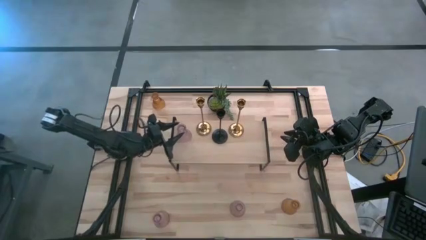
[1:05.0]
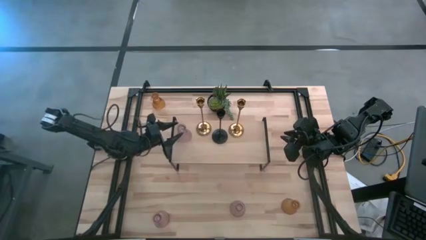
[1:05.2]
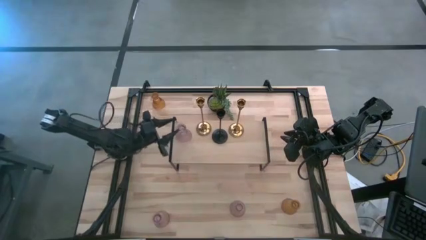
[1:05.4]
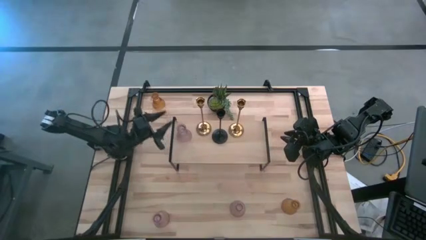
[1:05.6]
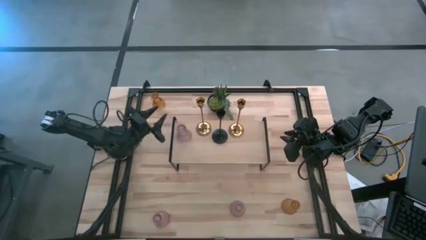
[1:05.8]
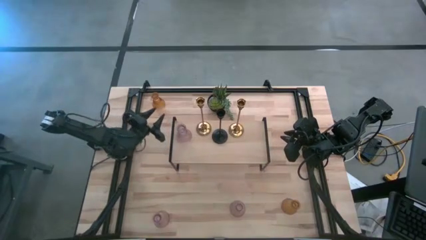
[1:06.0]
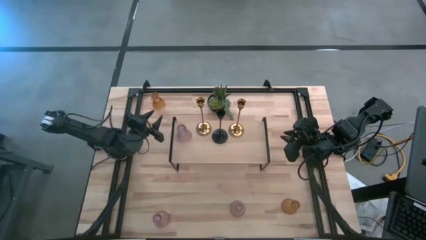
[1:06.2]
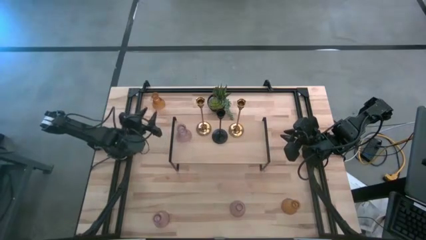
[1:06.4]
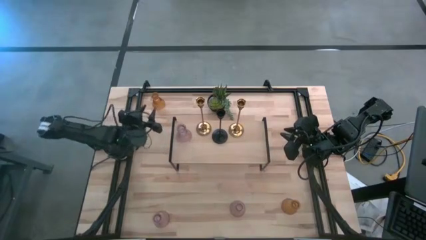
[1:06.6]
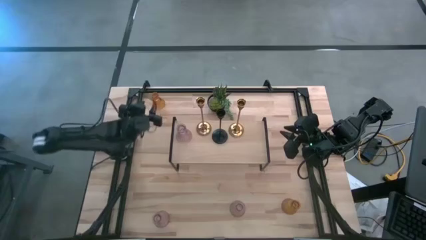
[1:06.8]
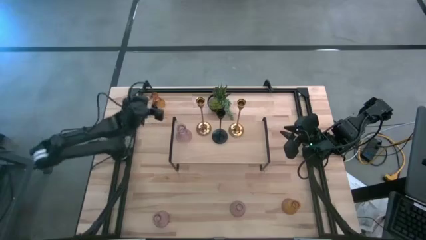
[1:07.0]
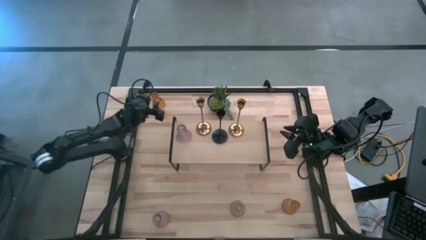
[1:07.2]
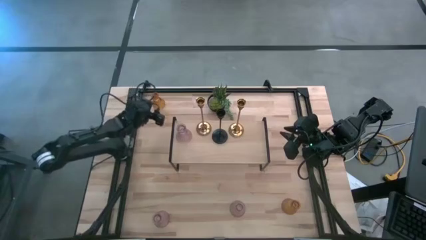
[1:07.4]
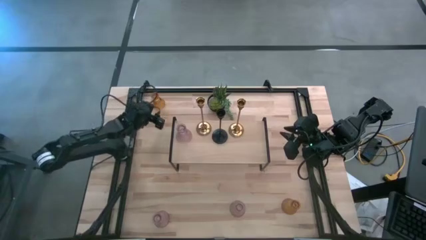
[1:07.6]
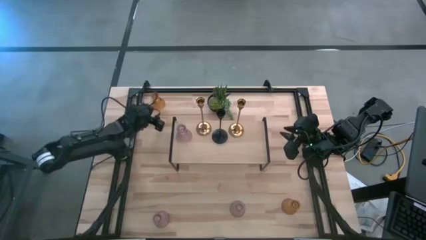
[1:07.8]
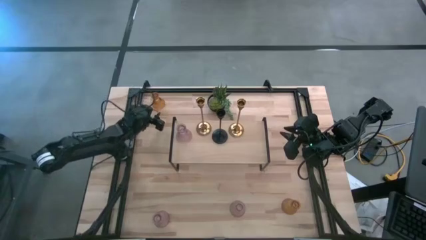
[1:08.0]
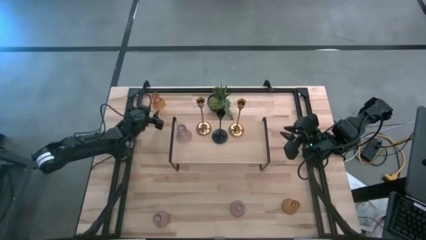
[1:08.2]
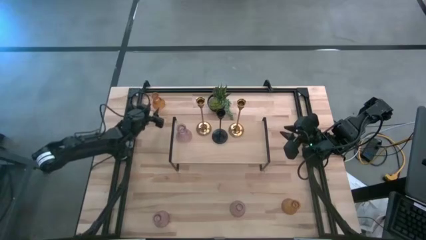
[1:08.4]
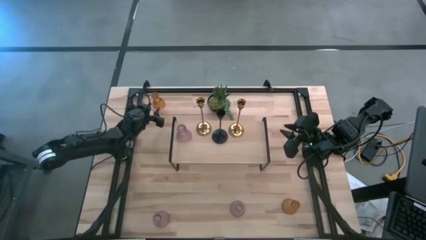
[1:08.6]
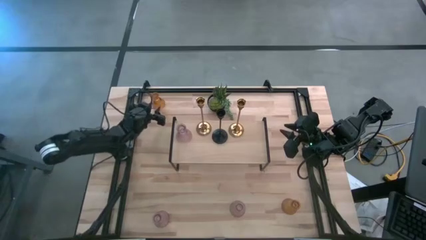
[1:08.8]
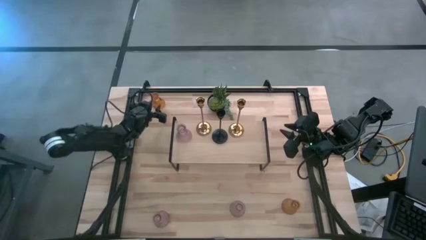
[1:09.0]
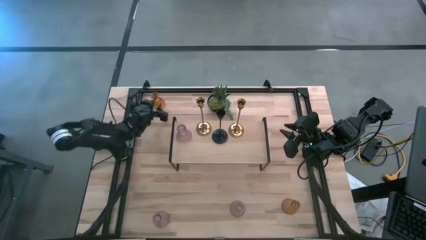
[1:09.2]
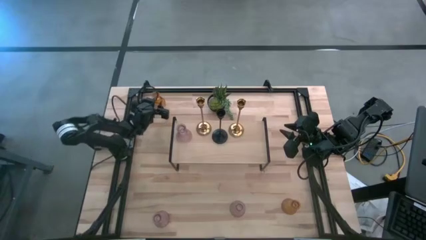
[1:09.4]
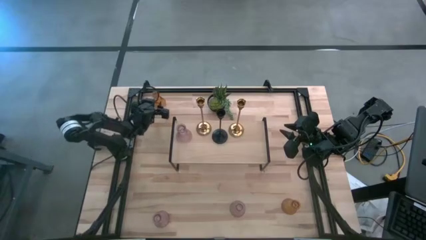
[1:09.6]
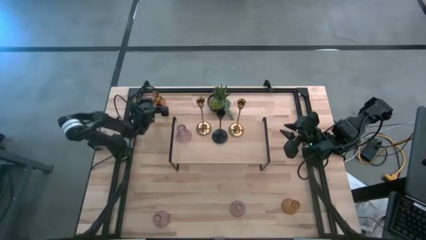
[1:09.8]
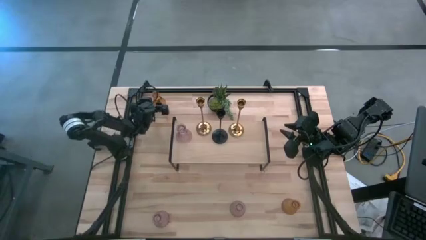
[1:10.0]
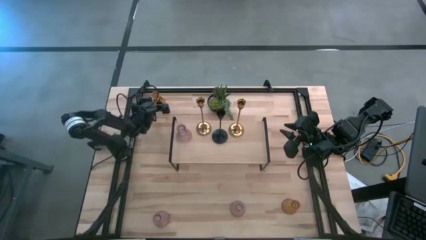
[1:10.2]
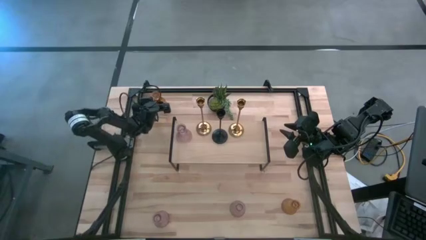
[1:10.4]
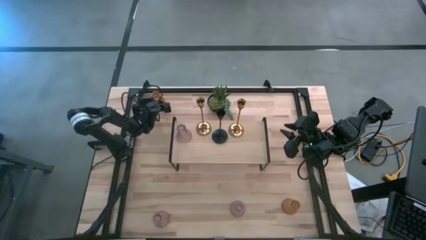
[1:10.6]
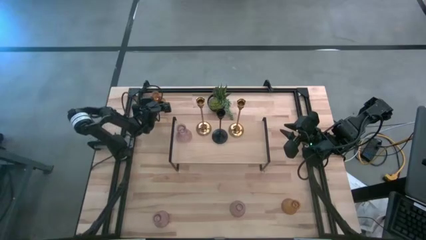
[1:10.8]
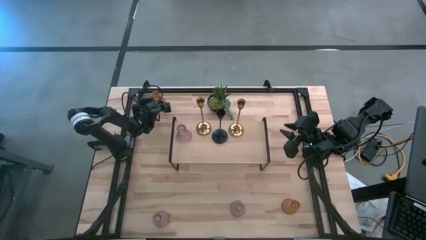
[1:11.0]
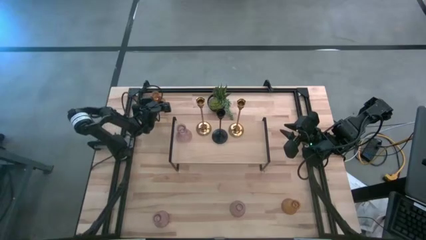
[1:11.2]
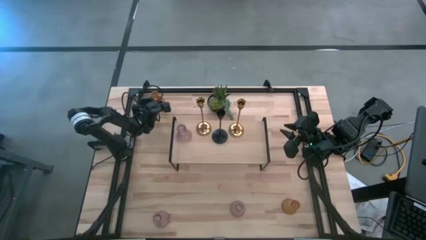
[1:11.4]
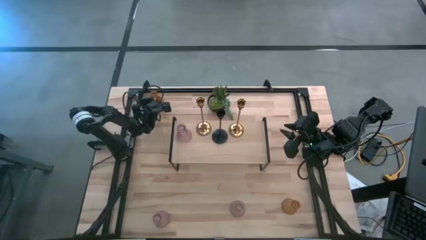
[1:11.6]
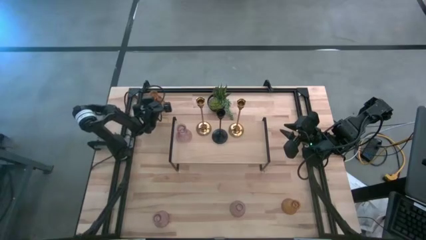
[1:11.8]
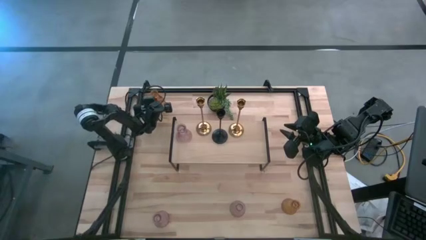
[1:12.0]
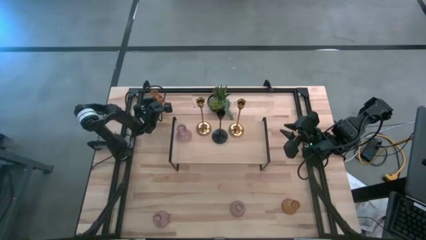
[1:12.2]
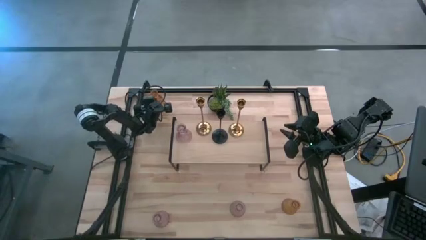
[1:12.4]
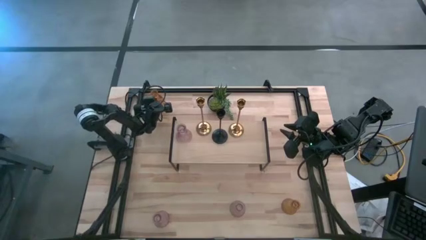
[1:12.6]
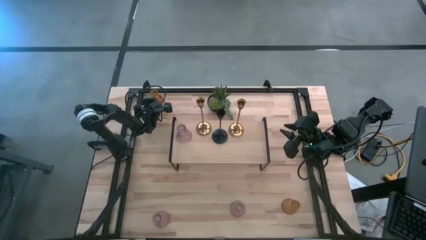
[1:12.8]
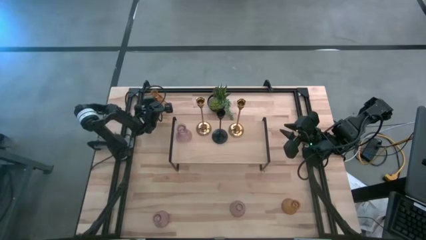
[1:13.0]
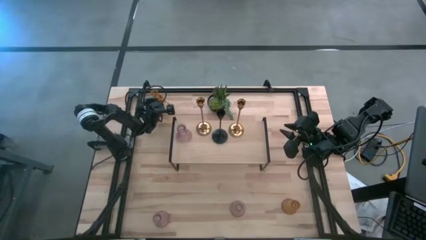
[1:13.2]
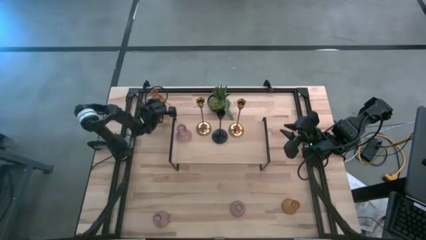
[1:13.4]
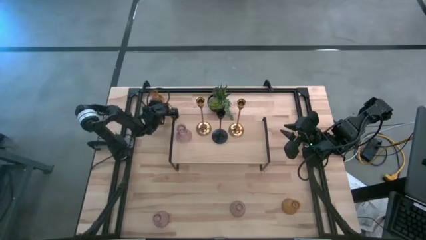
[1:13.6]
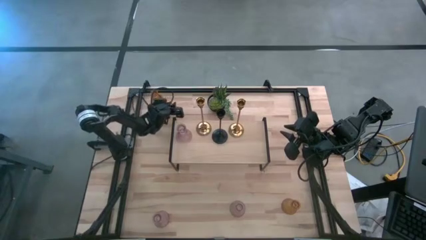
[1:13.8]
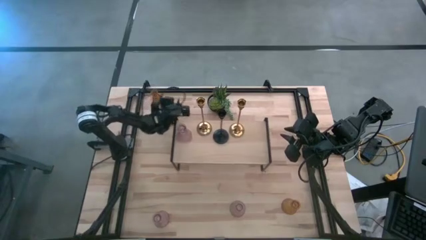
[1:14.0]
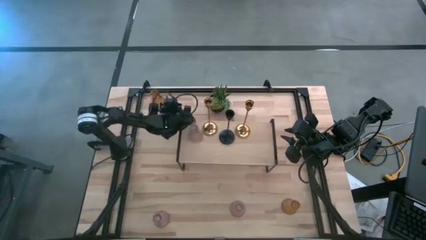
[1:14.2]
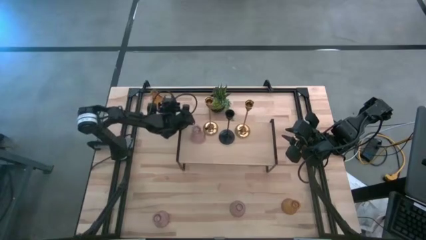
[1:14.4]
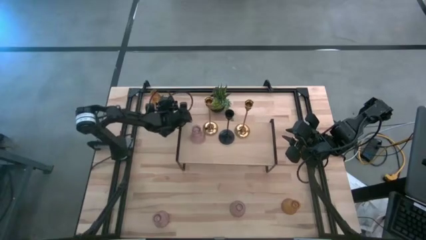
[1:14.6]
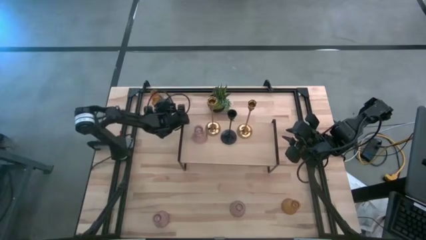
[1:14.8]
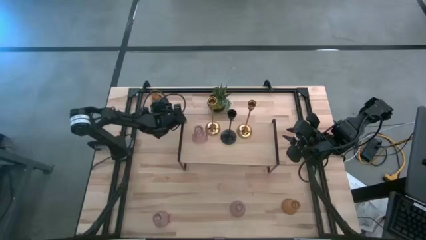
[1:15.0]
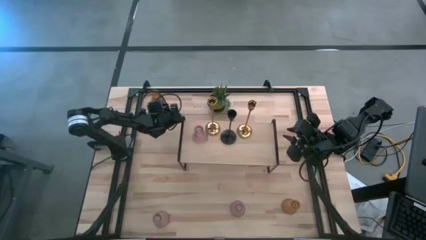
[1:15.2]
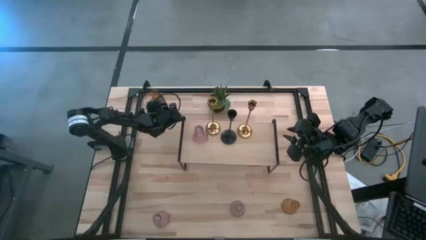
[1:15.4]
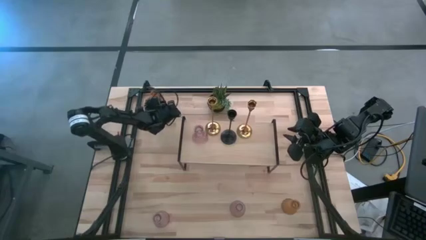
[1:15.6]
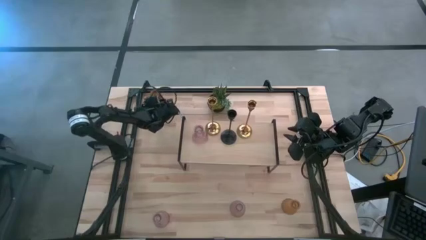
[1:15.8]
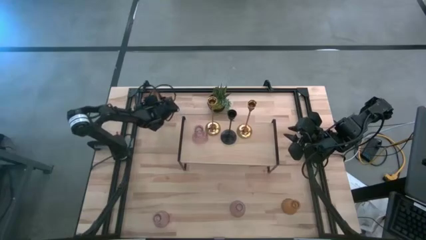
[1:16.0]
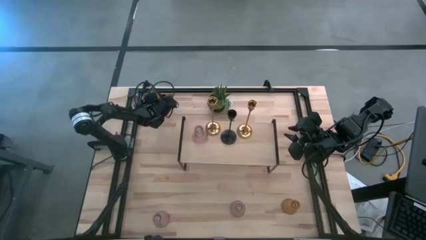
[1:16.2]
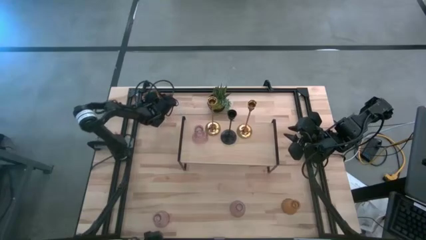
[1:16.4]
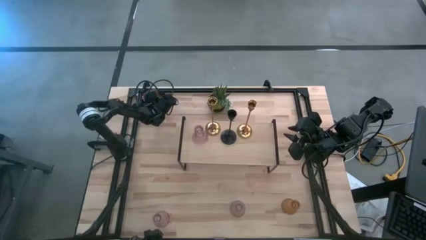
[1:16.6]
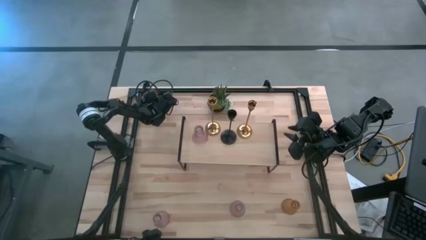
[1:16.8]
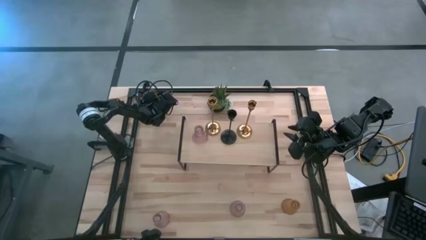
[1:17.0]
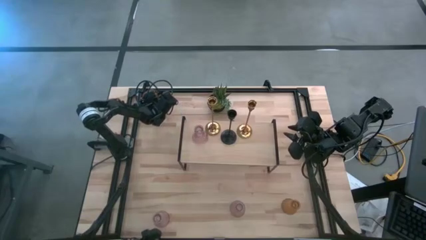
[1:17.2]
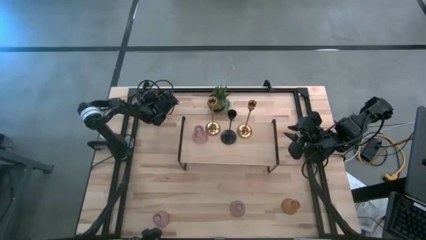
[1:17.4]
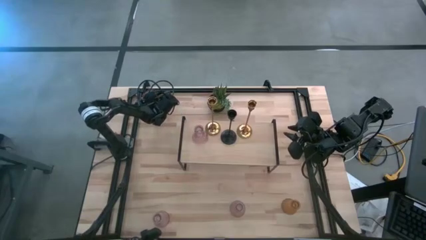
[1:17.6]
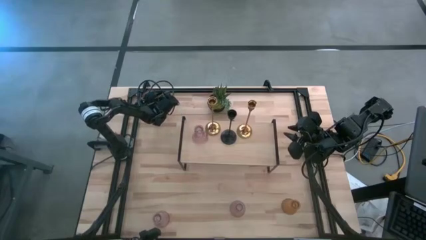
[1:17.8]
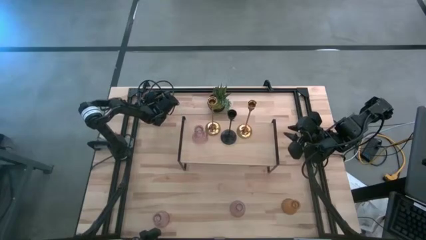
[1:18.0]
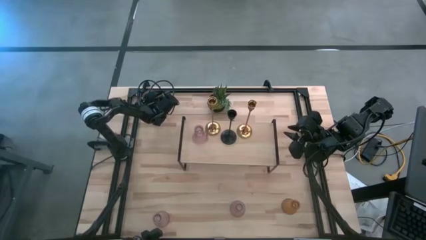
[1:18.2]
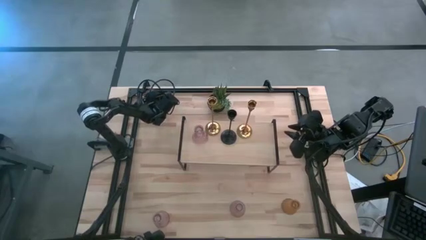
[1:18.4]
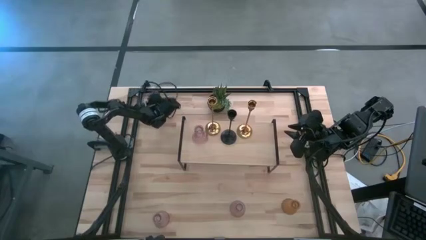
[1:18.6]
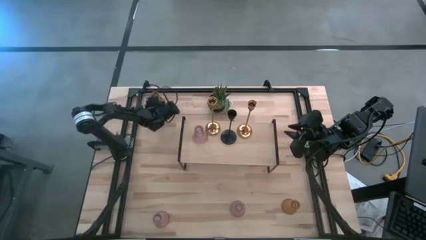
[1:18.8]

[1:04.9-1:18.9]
Task: Pick & Place candle stick holders
Put the top orange glass candle holder on the shelf

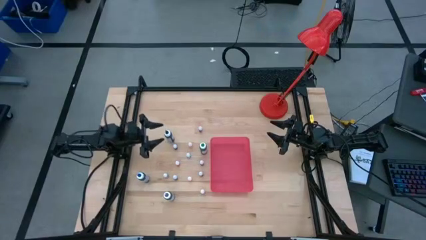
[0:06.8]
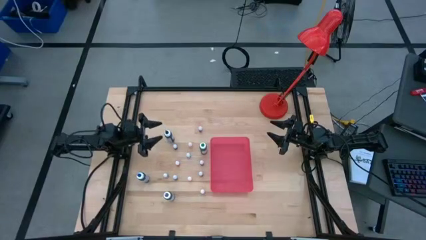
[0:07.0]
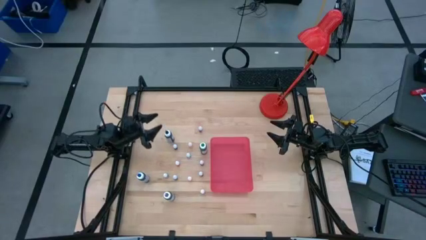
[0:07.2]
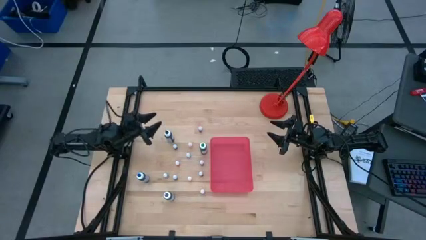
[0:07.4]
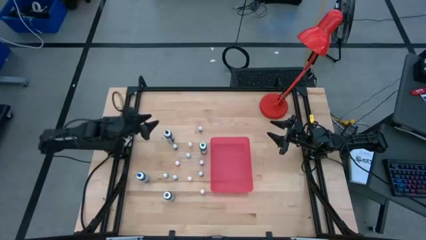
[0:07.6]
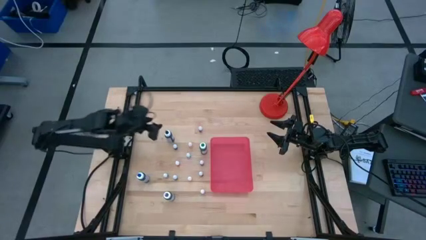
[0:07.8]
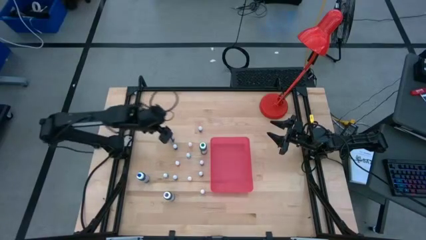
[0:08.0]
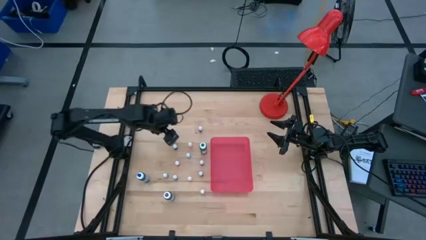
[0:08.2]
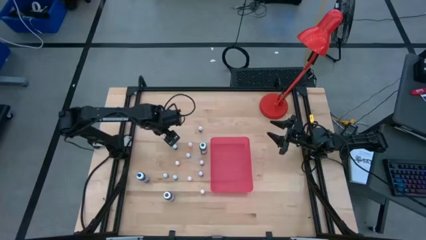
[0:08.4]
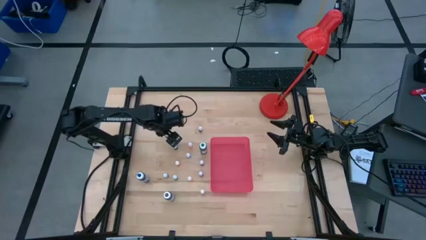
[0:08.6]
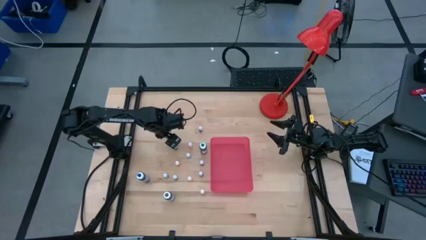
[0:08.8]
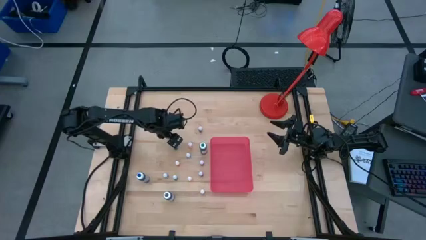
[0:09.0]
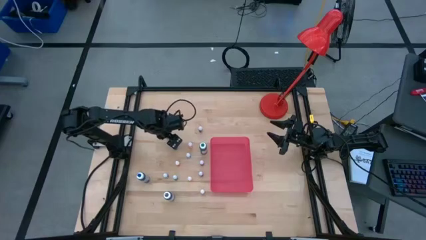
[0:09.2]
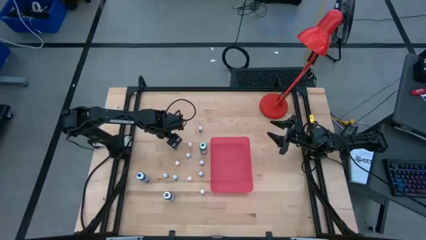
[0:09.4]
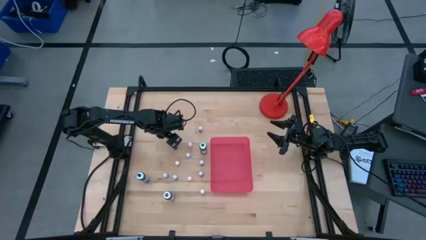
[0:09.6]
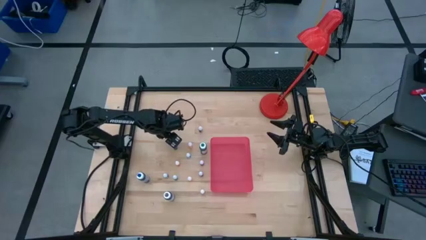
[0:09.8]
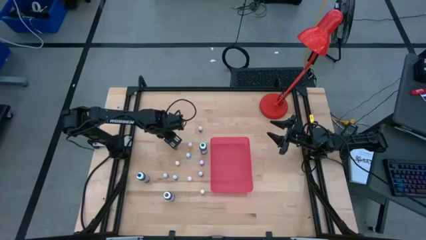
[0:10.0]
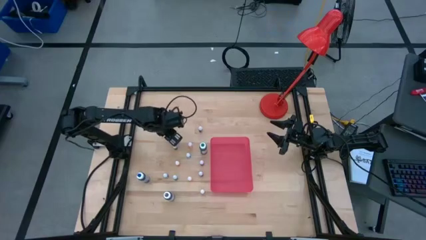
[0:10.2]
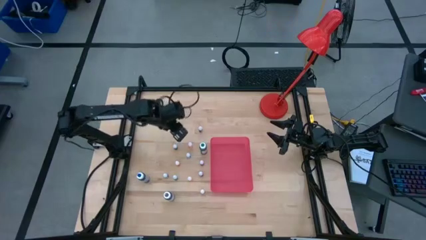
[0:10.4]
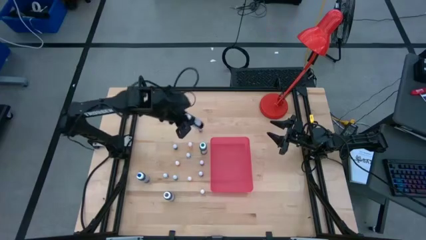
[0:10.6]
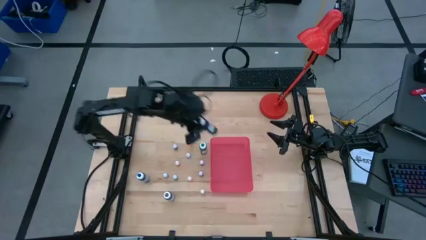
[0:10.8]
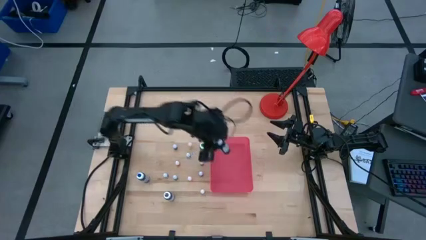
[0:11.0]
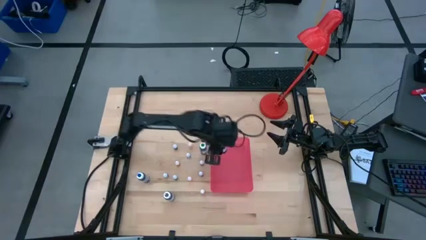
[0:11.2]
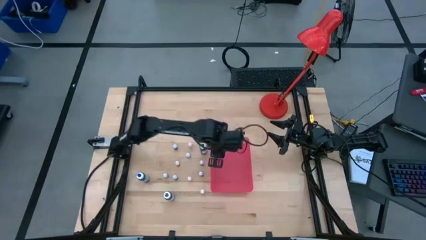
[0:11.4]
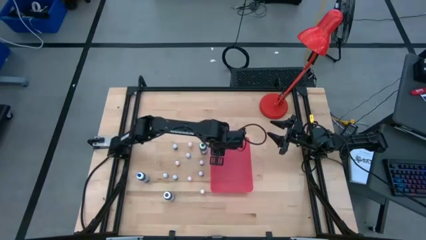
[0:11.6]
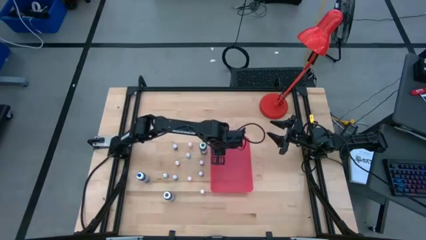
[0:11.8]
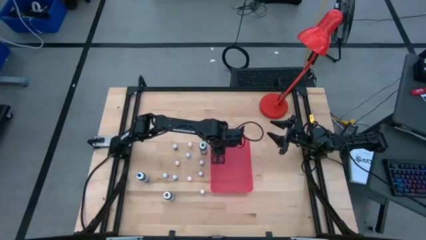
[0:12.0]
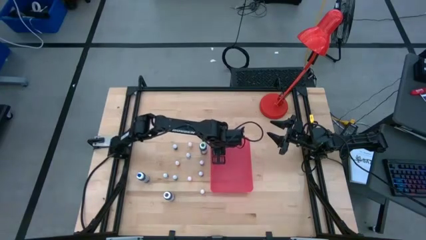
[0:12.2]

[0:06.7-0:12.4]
Task: Pick & Place food coloring
Put the big black food coloring bottle into the red bin
